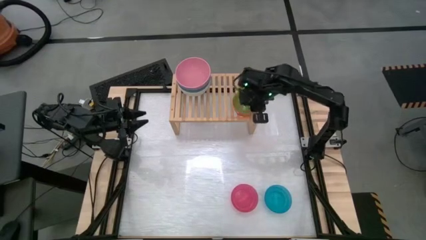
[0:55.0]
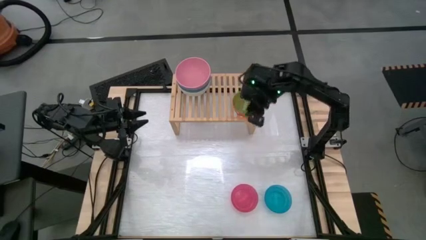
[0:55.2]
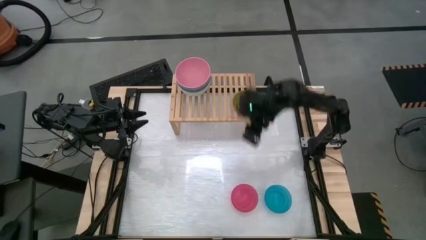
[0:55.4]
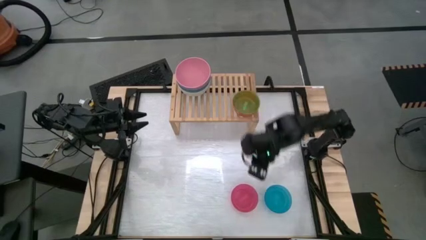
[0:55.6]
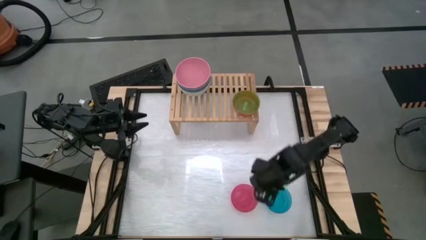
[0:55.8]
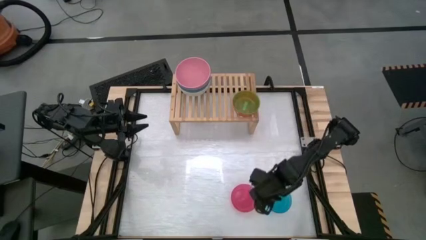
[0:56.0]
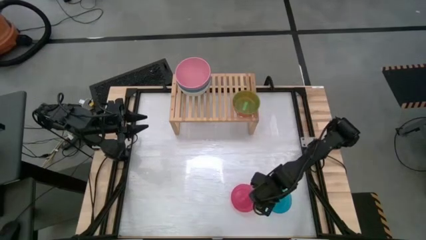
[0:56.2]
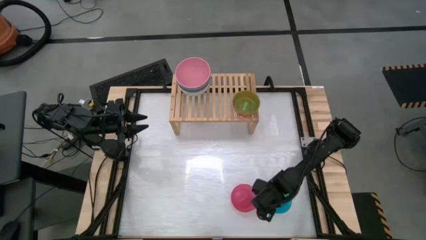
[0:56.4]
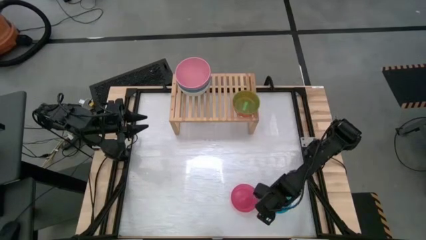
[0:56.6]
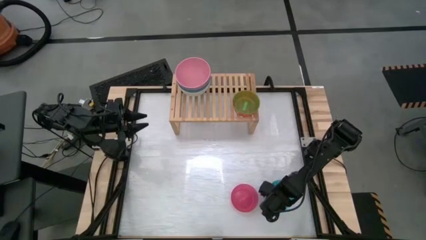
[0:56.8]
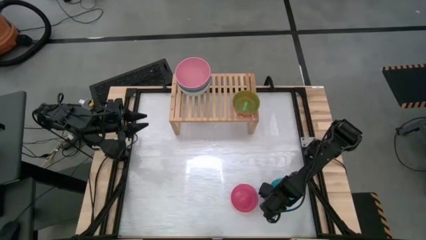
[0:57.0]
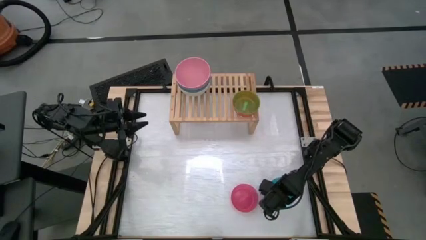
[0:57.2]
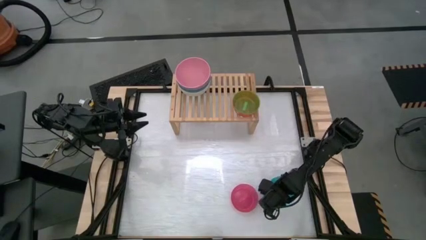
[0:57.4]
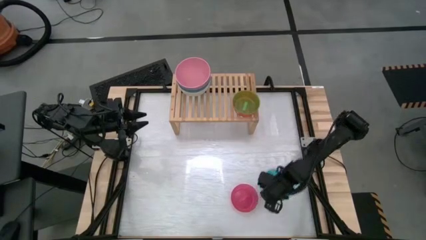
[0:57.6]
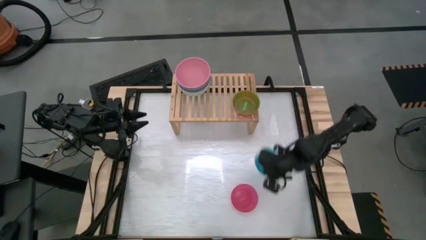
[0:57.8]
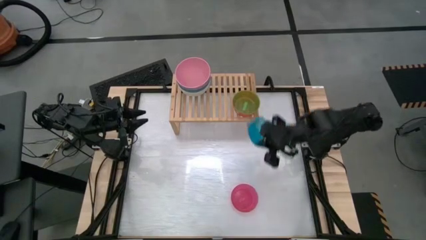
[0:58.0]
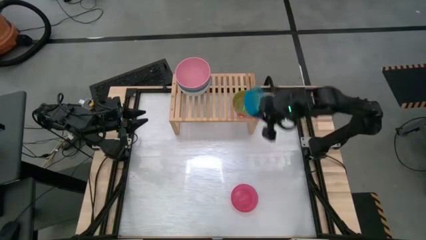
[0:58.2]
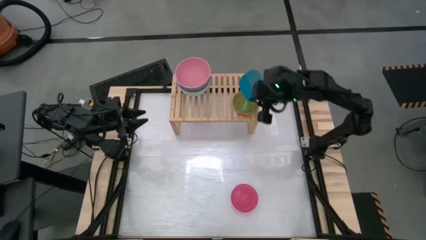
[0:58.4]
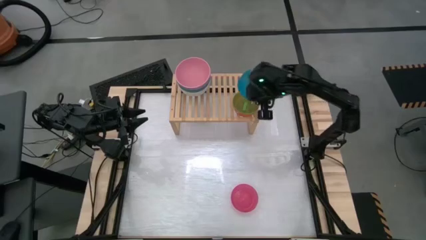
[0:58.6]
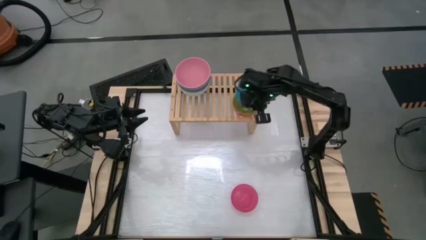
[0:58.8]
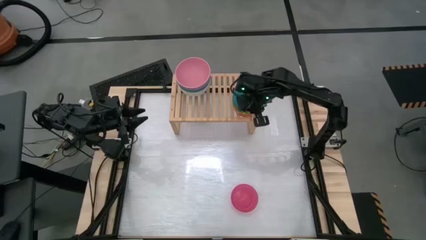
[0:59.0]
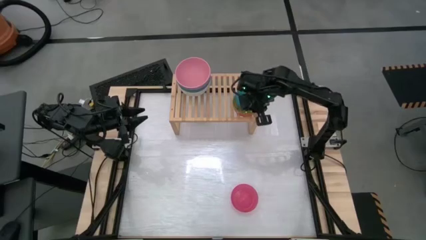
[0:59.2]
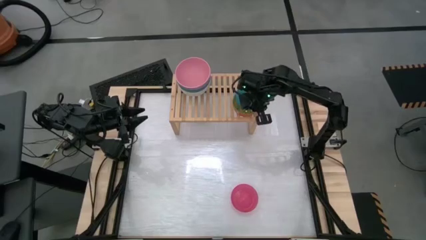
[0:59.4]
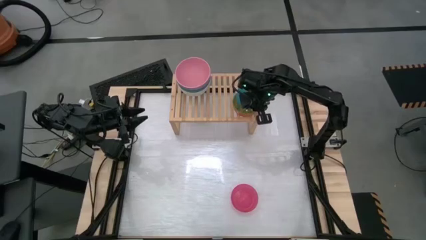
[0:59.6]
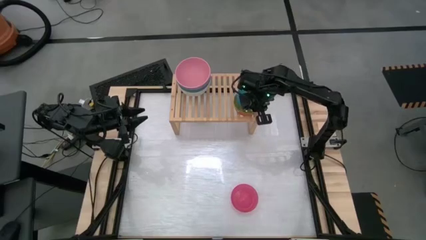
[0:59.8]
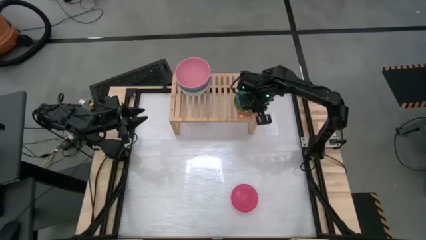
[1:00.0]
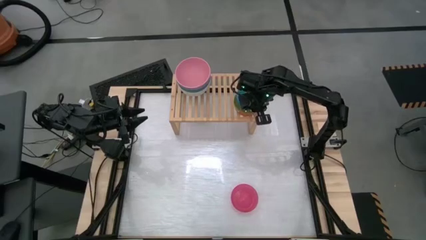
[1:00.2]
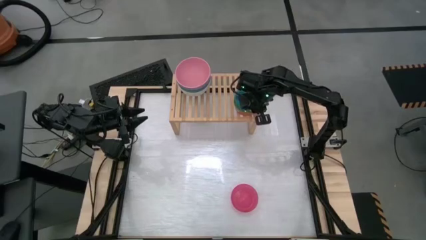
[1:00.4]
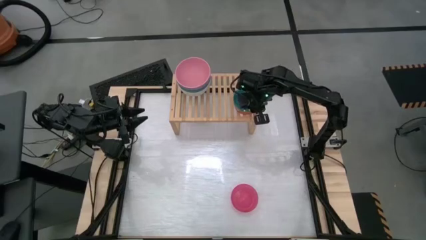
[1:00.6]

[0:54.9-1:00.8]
Task: Place and stack bowls onto a shelf
Stack the small blue bowl on top of the small green bowl

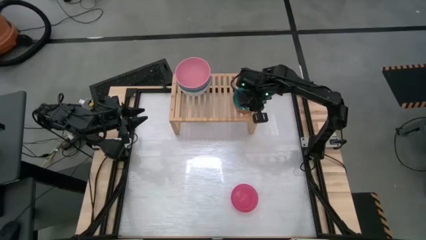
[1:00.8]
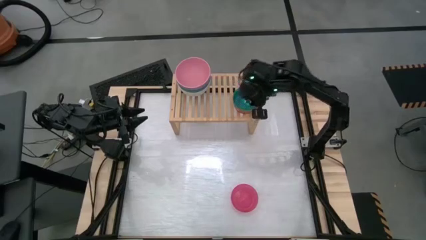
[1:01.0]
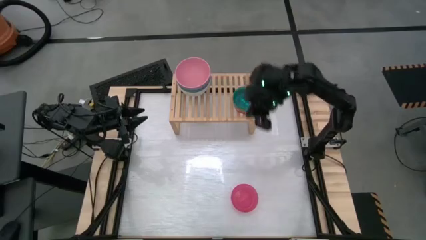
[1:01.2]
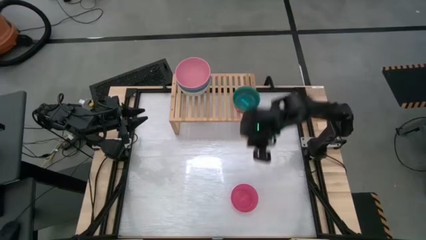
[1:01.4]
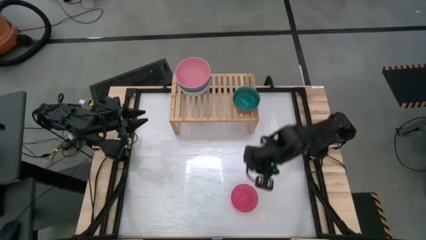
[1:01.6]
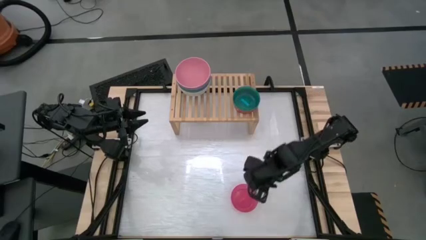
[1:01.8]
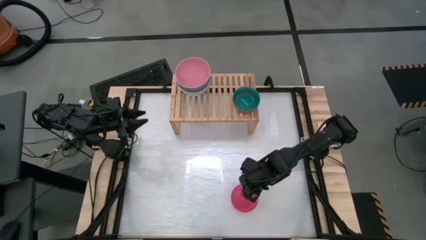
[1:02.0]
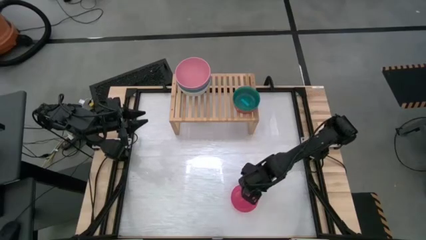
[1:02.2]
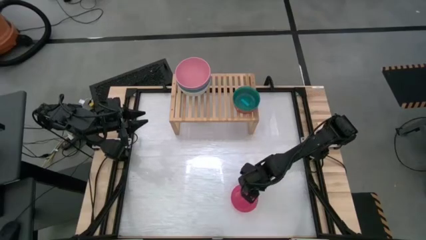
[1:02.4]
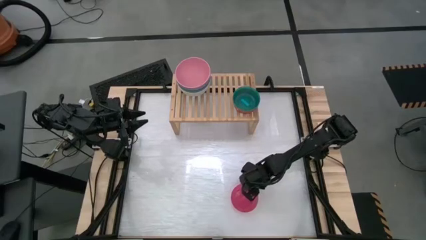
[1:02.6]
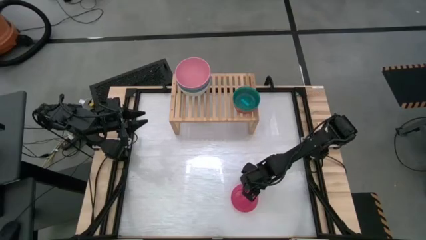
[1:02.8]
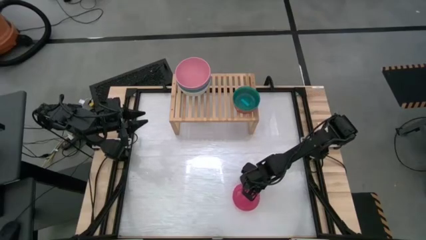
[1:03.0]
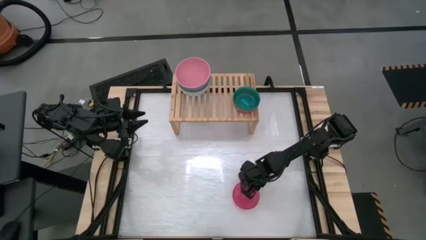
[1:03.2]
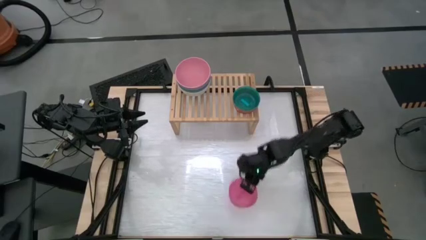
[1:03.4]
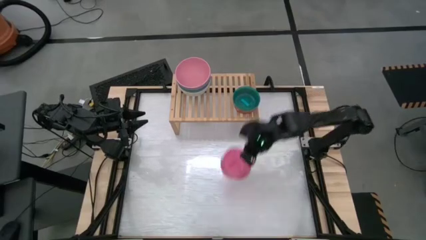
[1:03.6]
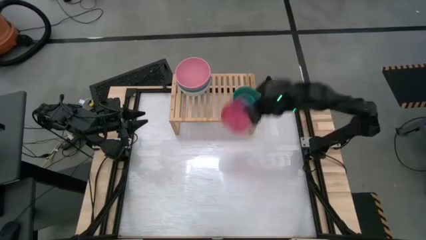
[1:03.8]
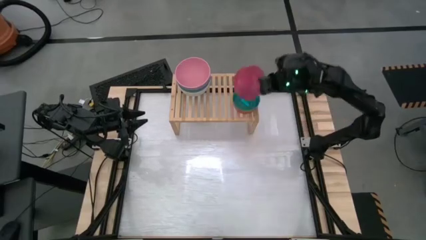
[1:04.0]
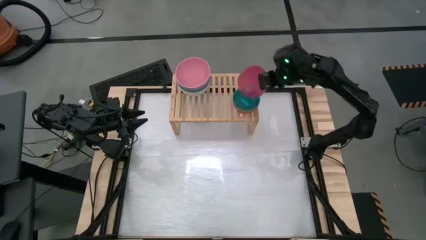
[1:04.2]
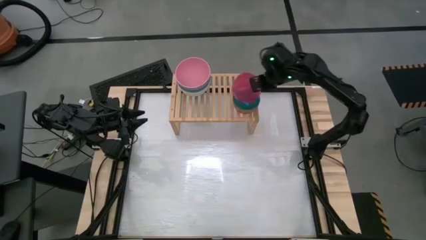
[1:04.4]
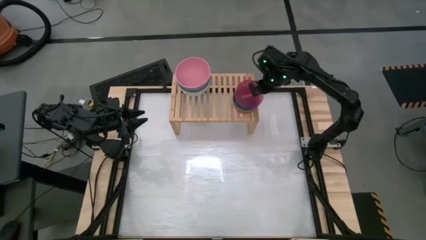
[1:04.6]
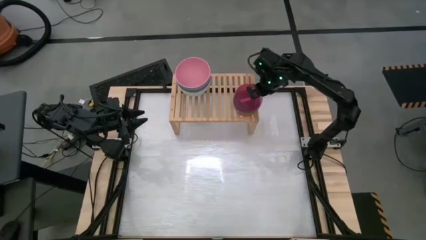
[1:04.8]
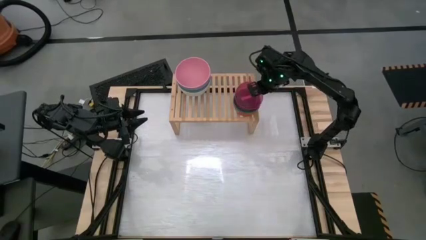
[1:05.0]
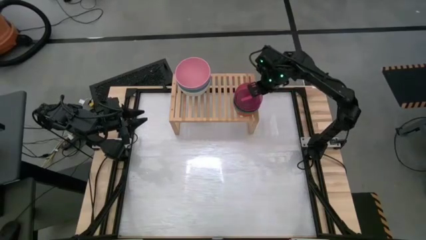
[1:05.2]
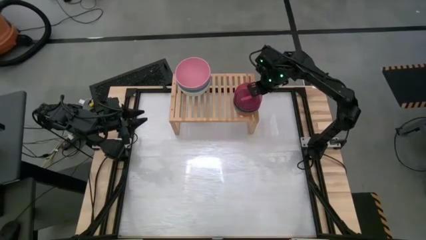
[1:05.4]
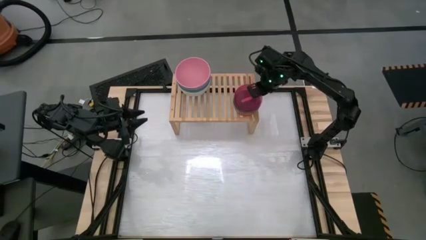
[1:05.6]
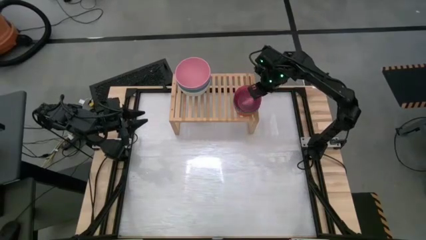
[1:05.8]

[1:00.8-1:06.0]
Stack the small pink bowl on top of the small blue bowl

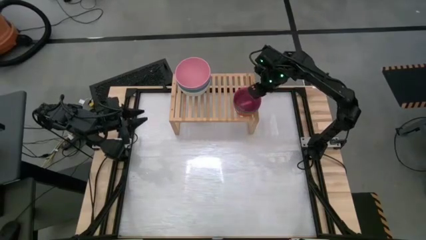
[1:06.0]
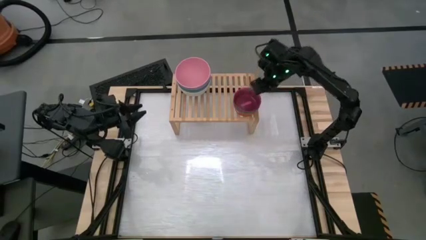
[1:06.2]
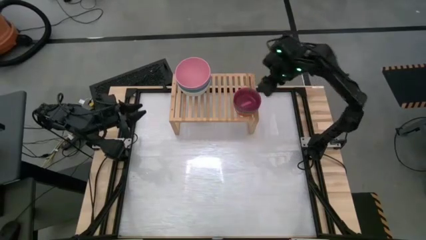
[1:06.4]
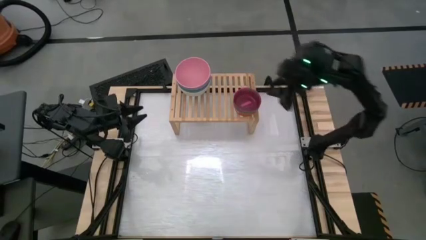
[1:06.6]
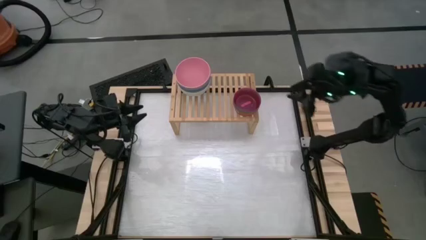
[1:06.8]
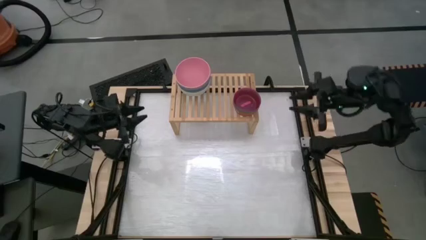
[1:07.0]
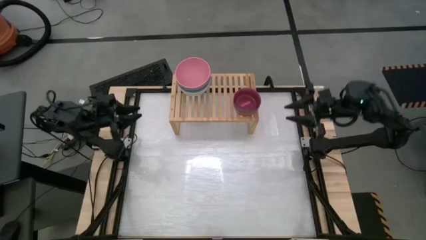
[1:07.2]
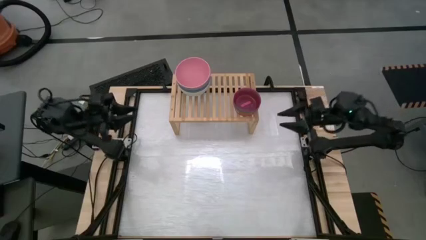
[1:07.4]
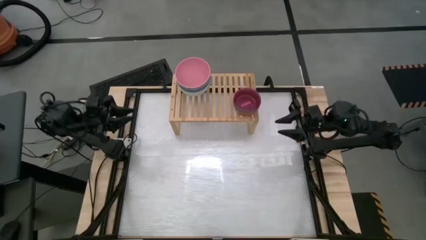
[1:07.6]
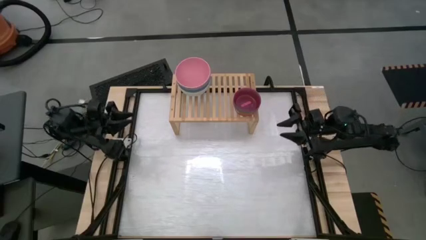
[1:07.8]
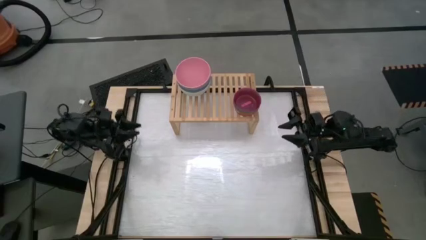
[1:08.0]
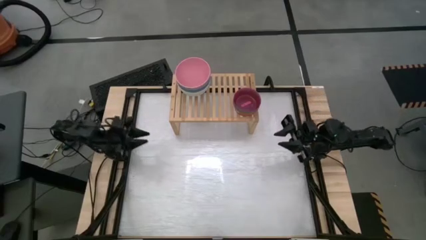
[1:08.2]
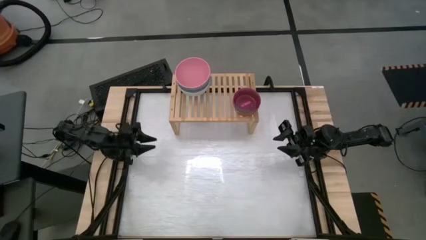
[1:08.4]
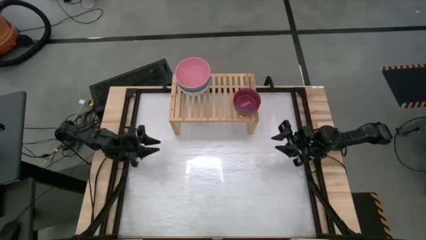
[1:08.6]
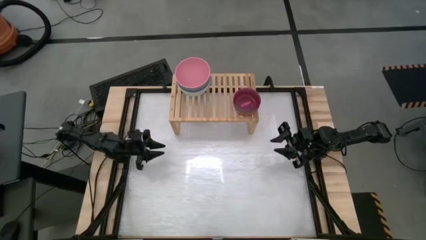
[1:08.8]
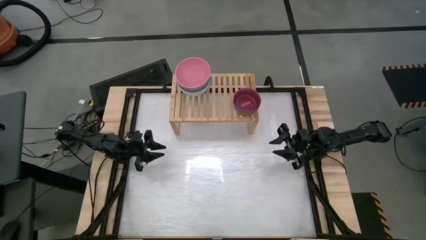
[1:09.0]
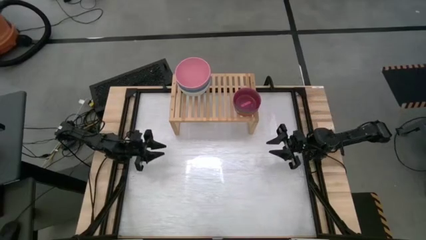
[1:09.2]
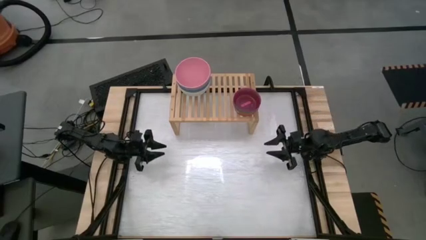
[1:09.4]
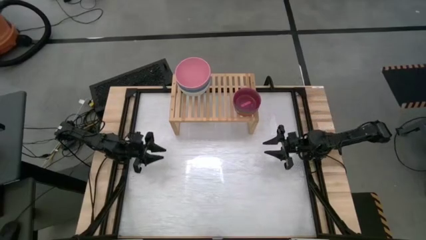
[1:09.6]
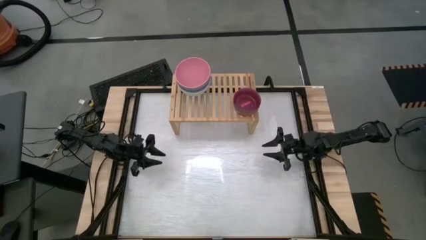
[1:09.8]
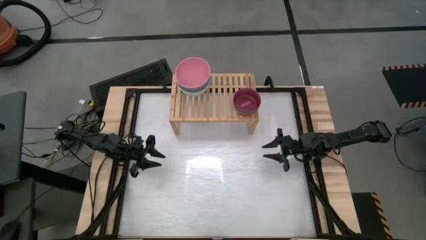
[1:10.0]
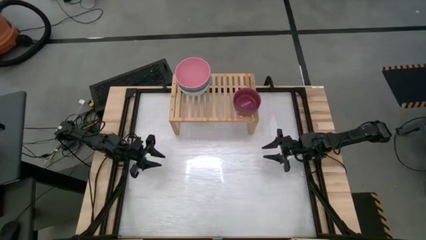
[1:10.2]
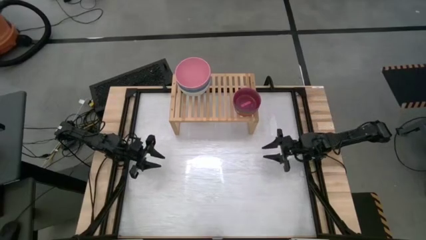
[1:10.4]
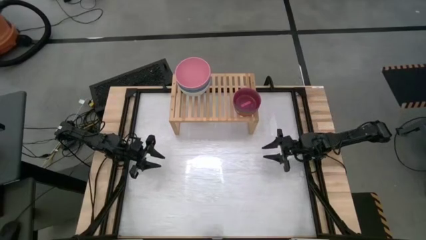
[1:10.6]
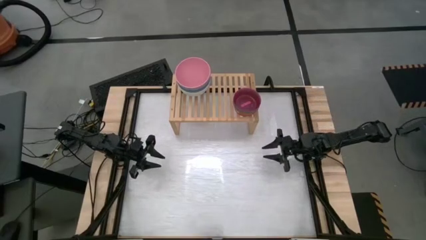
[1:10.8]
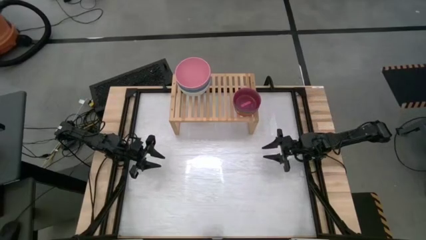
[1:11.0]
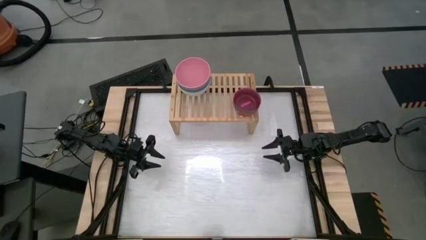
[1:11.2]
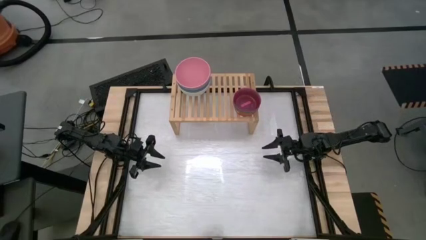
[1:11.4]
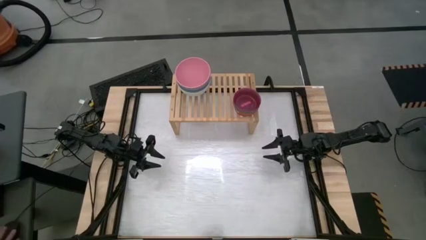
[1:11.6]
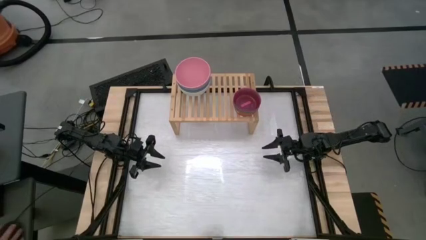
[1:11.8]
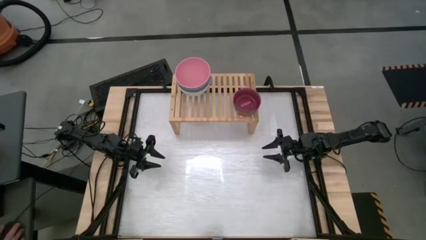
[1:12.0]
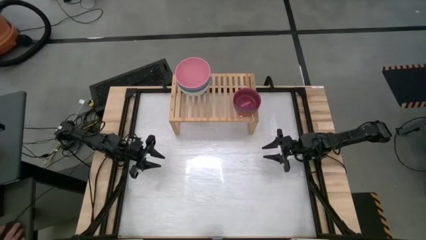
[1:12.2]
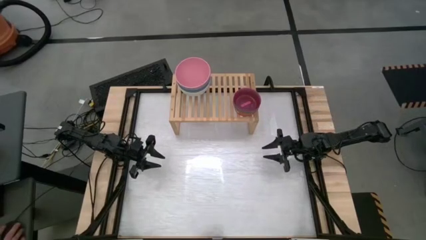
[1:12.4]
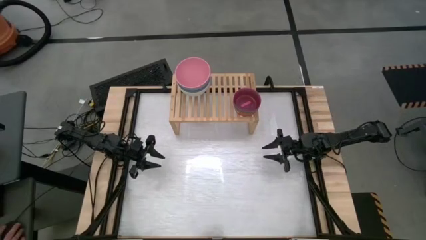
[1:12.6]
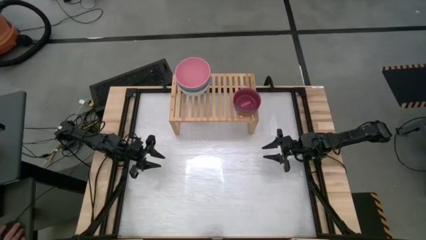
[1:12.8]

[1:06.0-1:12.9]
Return to Home Position
